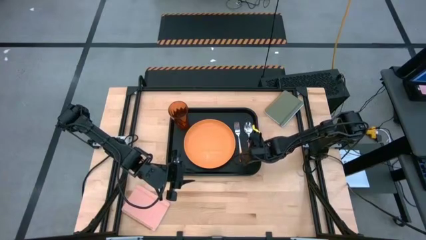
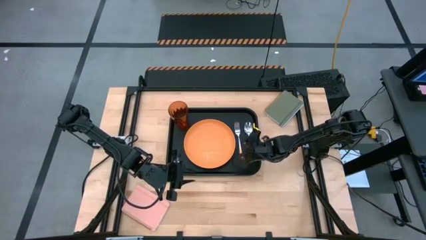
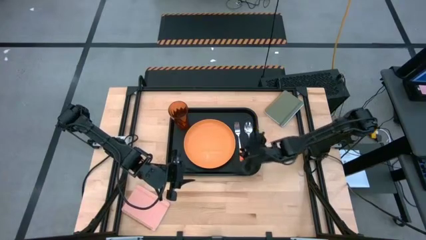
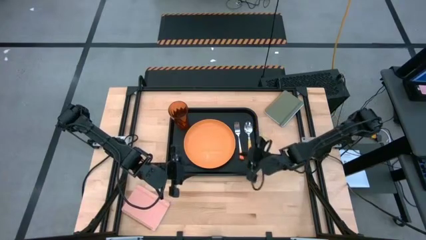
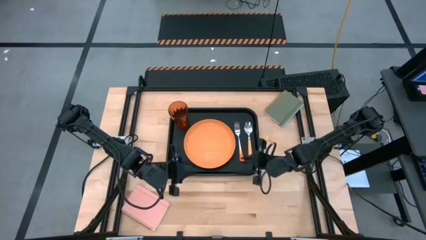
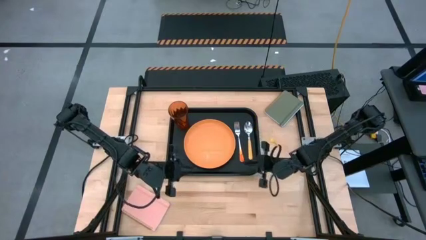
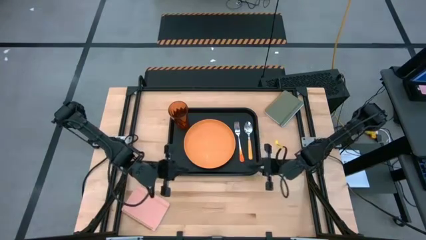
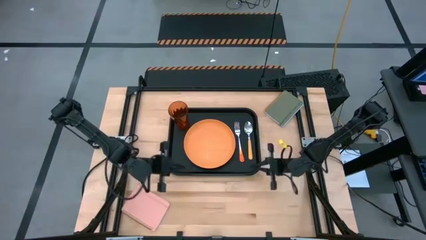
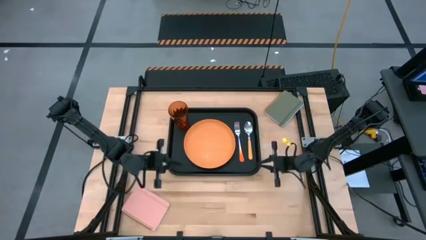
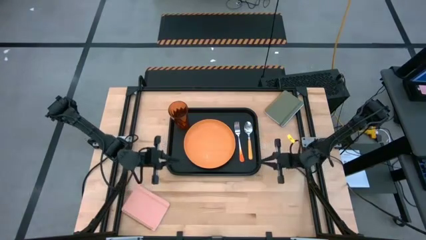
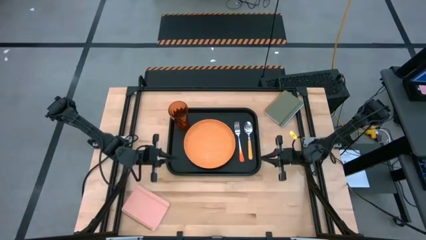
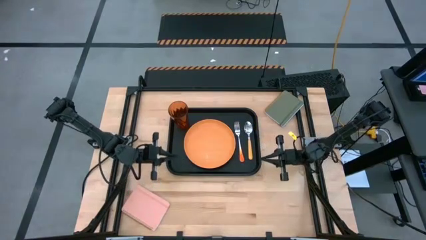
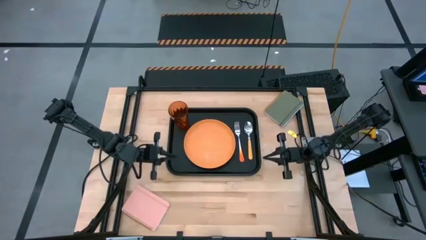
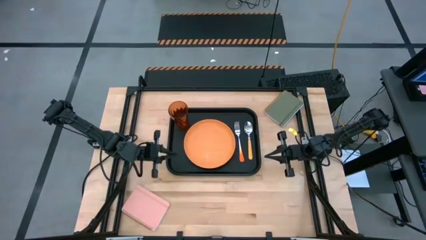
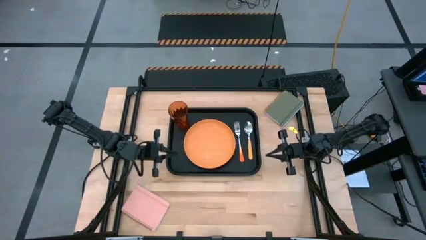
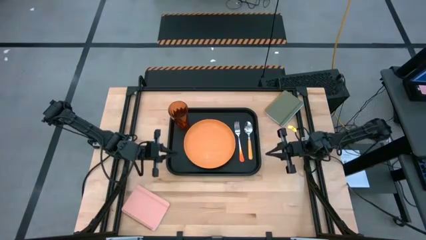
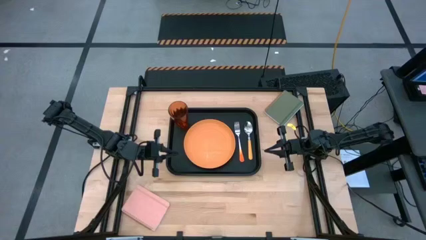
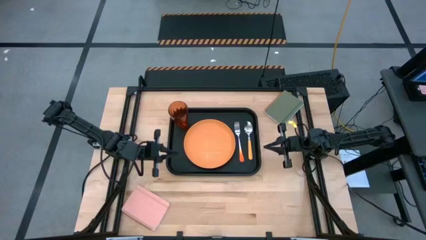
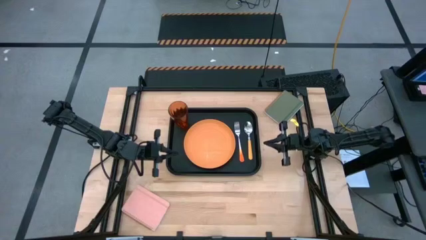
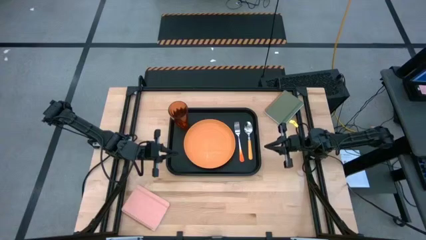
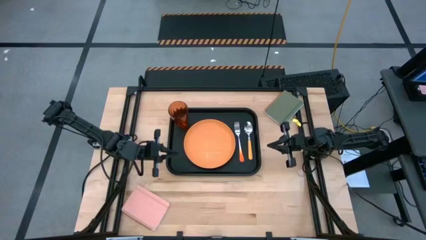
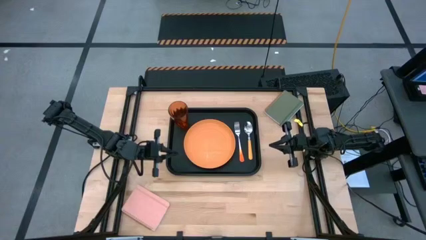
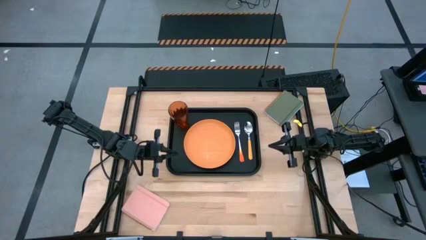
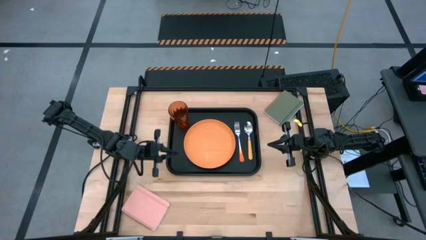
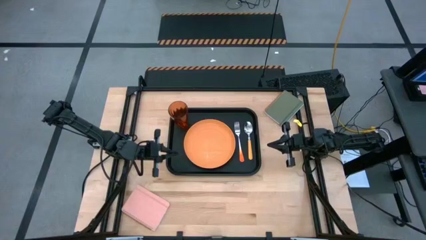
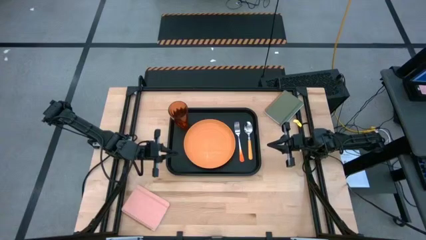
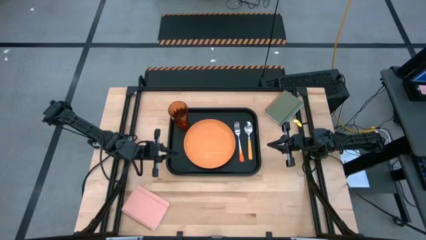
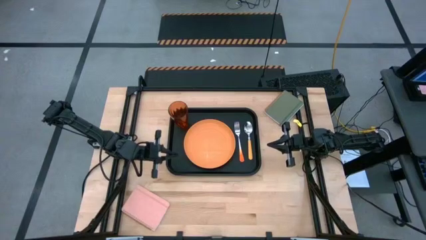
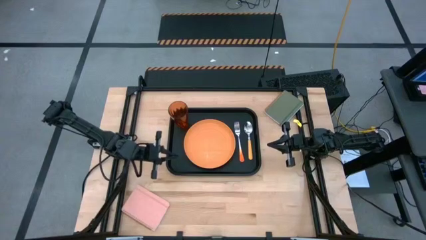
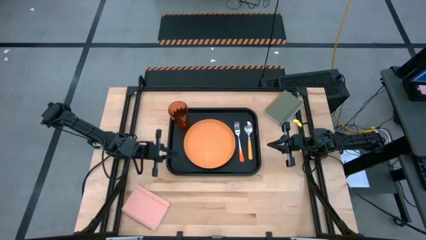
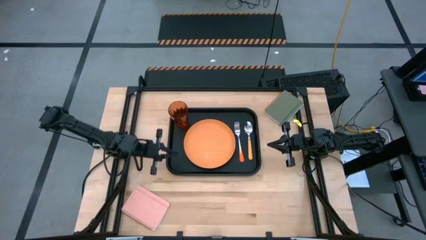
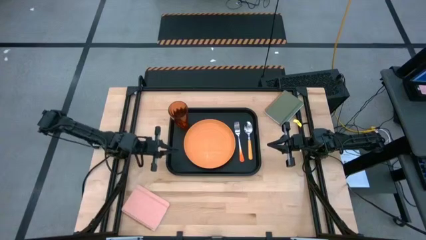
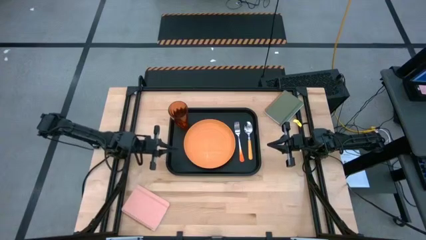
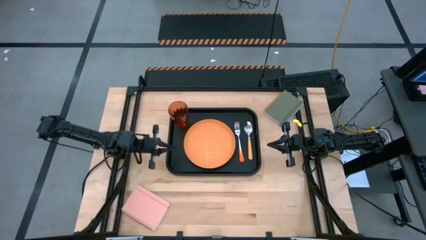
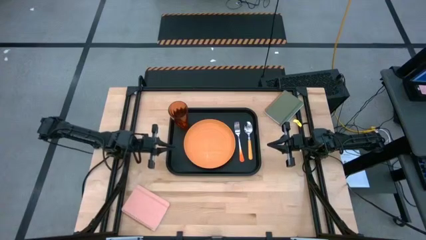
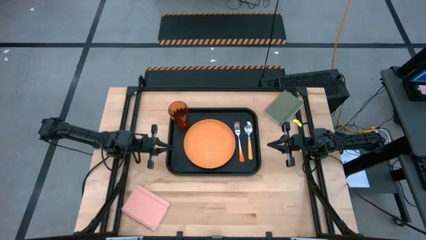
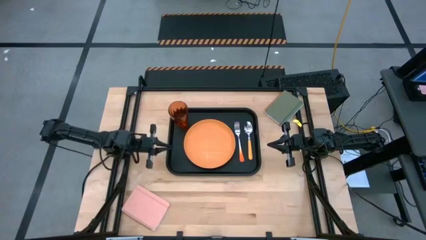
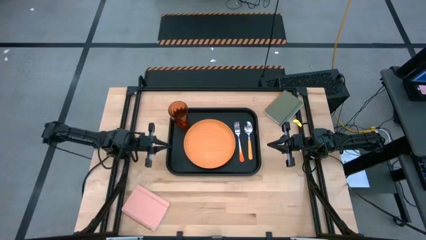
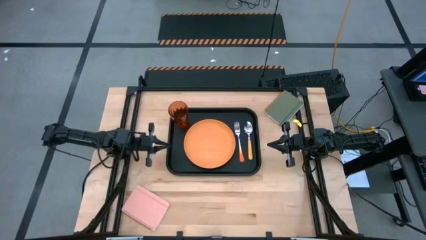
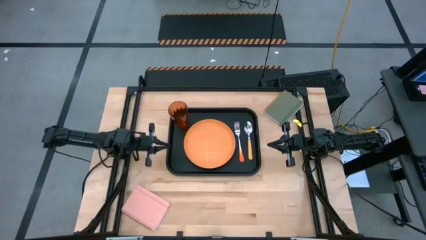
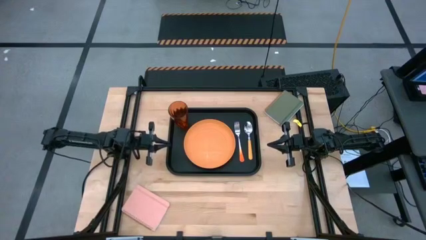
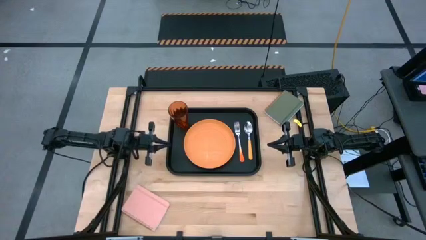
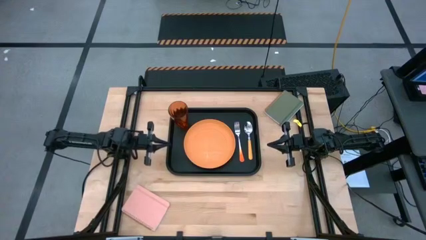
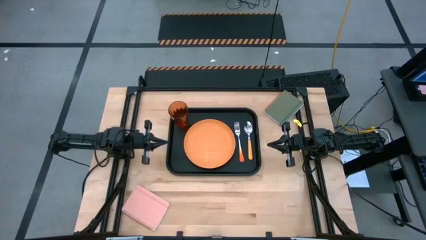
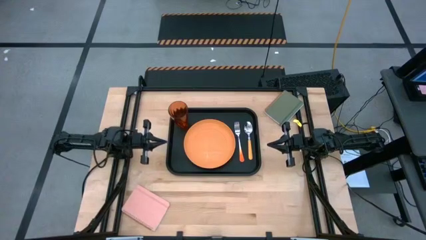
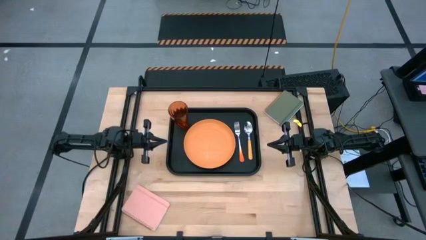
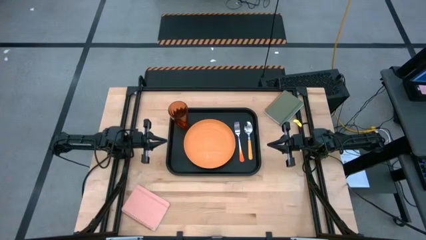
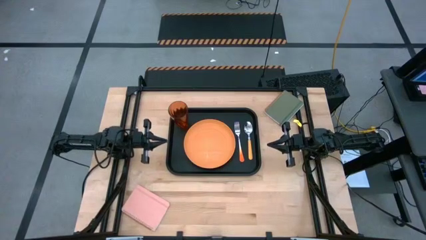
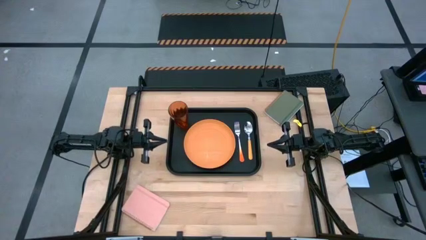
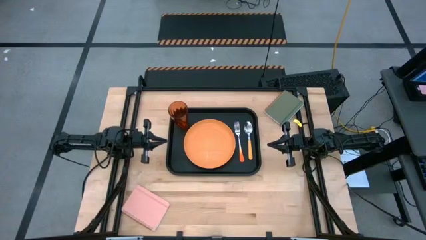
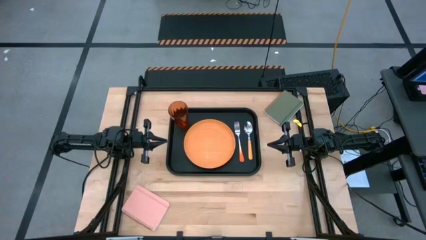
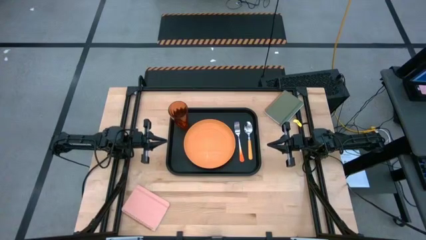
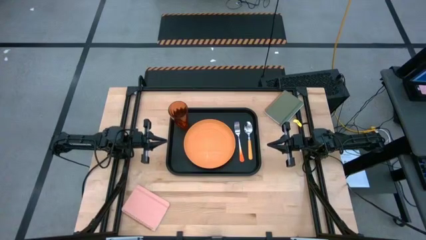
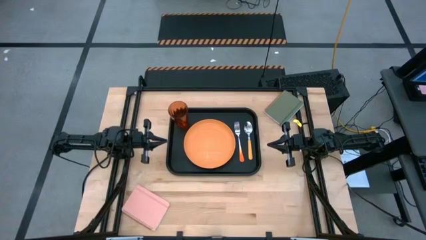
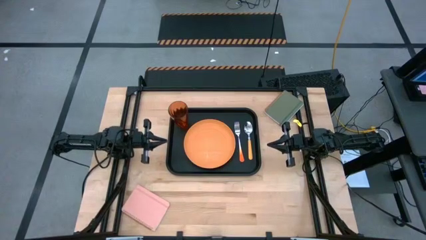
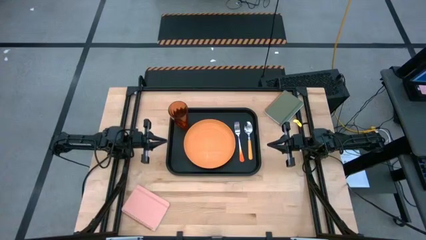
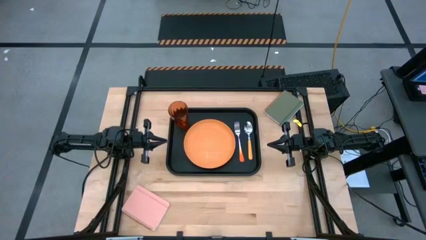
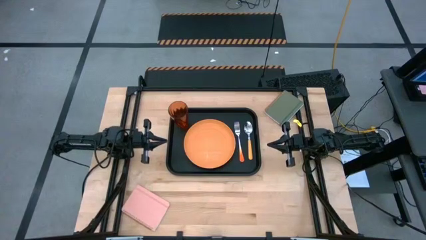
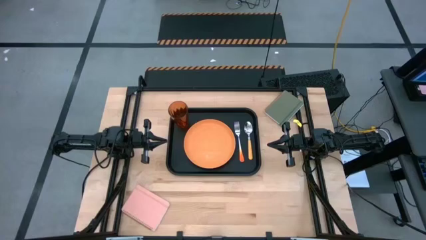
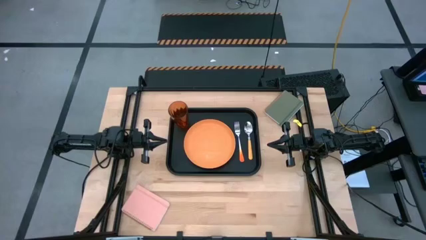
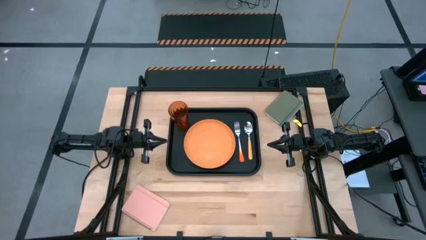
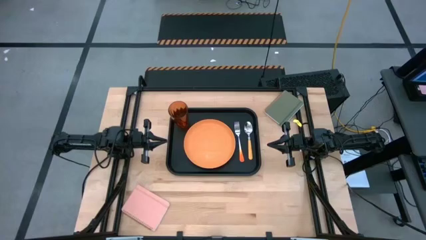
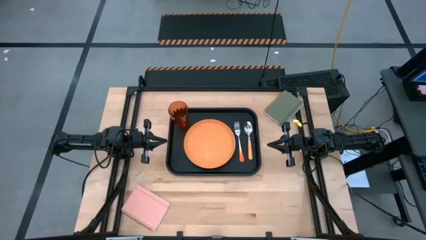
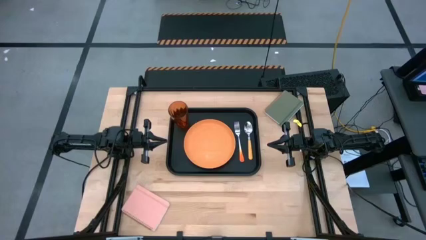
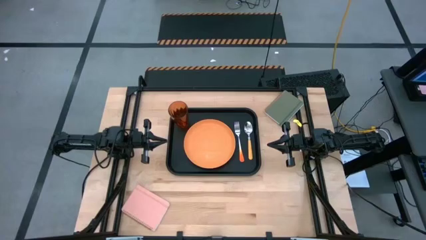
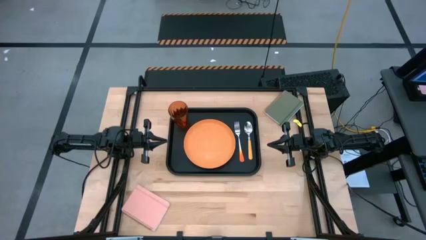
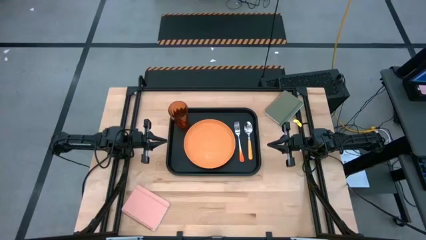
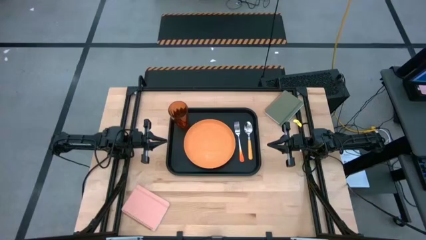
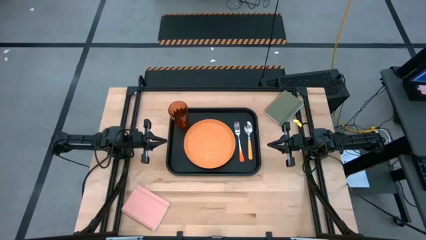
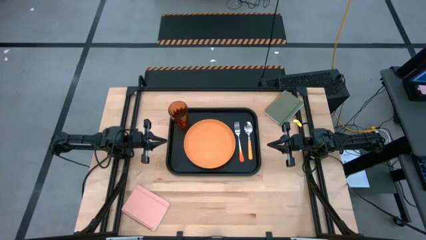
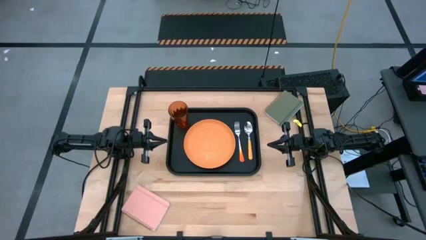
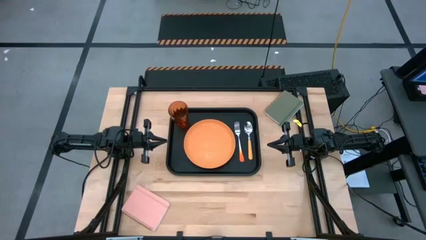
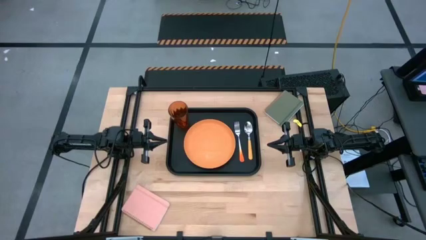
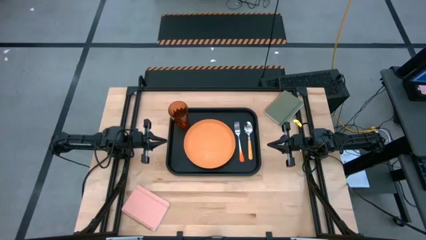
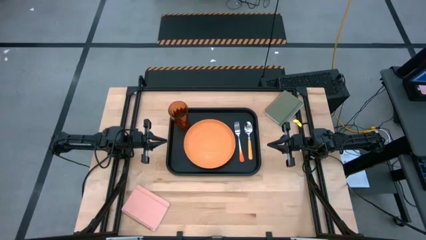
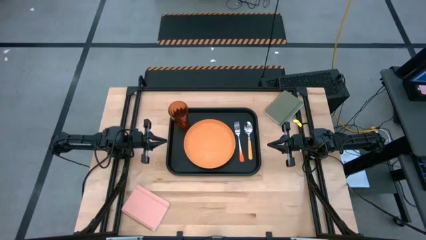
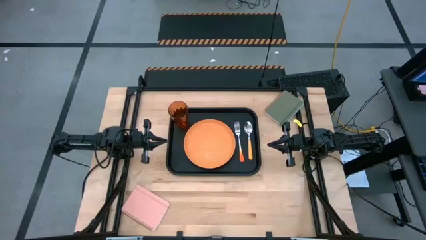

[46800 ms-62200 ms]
Task: Pick and place plate/cup/fork/spoon on tray
Return to Home Position
